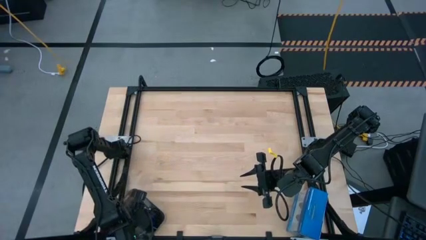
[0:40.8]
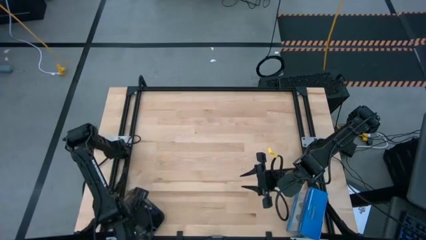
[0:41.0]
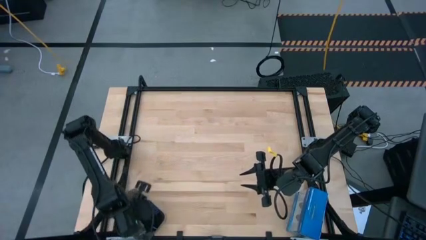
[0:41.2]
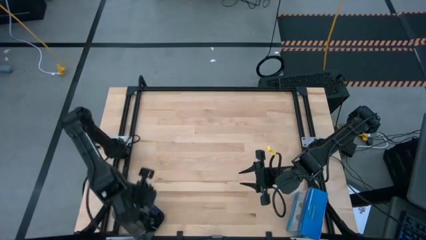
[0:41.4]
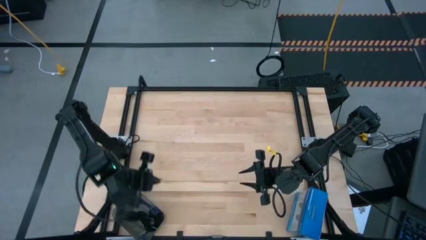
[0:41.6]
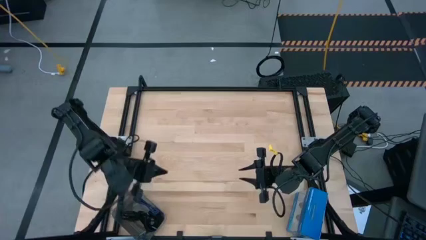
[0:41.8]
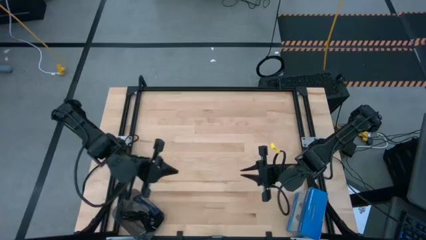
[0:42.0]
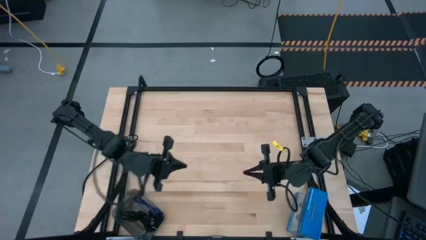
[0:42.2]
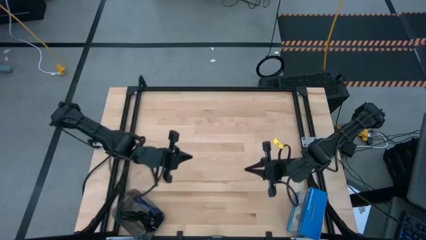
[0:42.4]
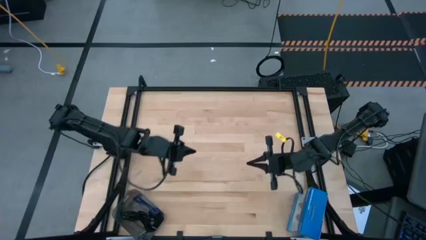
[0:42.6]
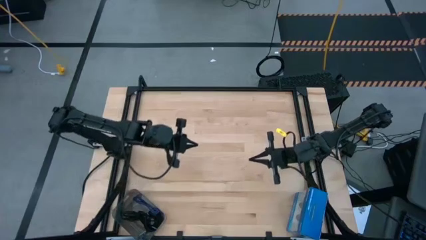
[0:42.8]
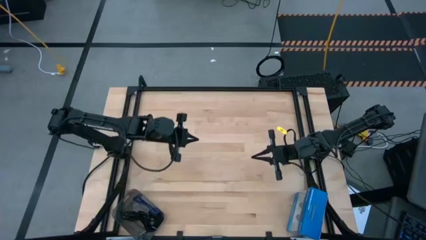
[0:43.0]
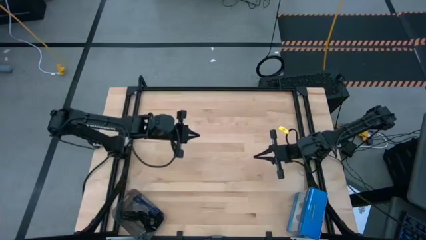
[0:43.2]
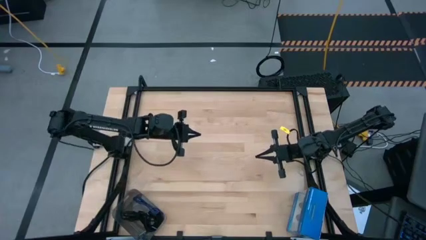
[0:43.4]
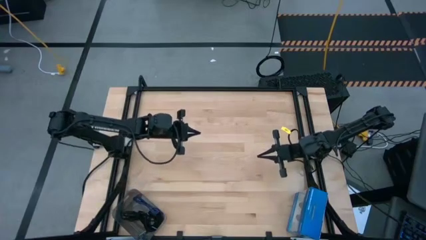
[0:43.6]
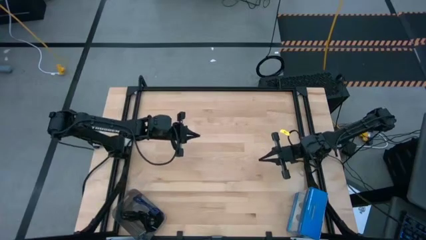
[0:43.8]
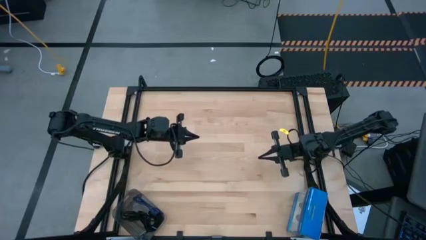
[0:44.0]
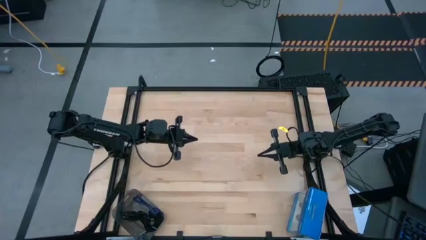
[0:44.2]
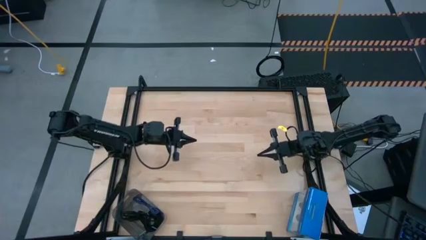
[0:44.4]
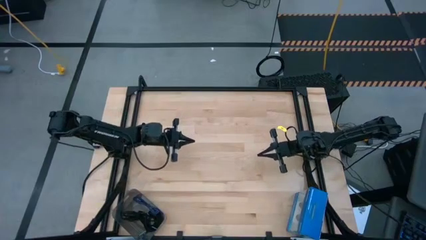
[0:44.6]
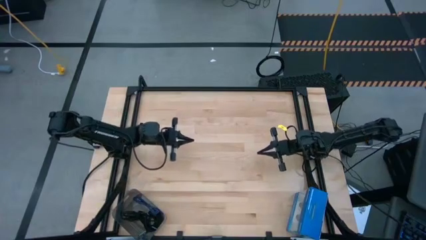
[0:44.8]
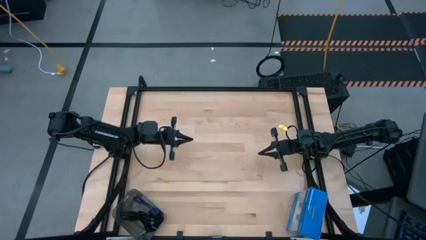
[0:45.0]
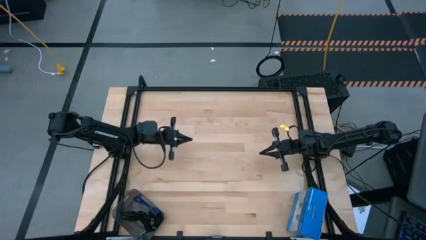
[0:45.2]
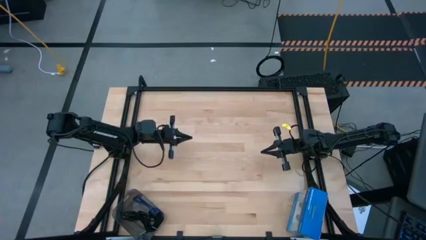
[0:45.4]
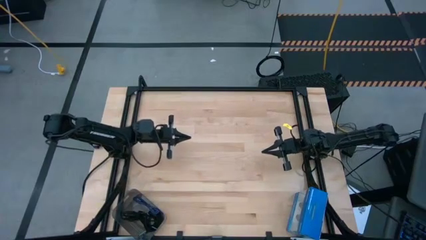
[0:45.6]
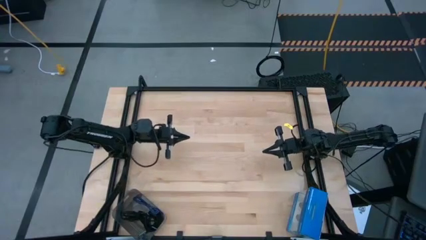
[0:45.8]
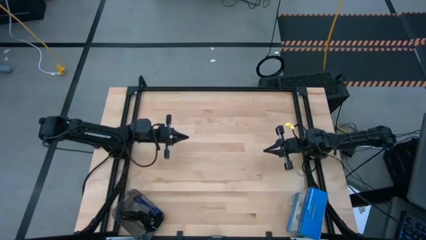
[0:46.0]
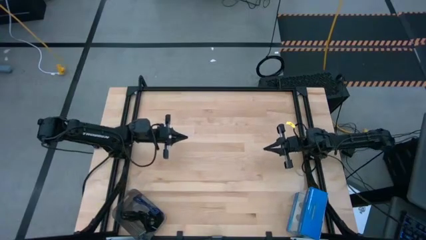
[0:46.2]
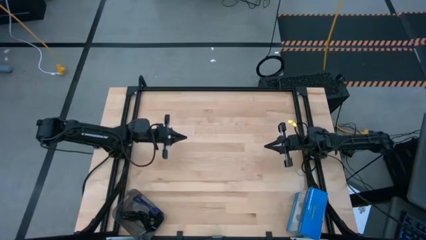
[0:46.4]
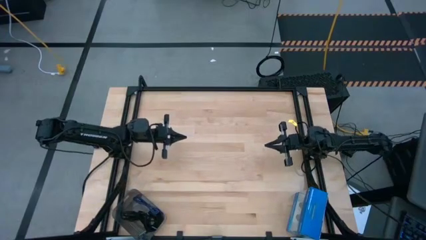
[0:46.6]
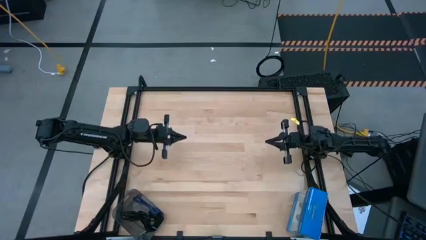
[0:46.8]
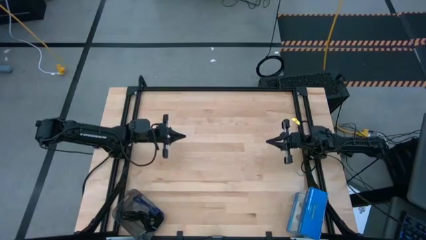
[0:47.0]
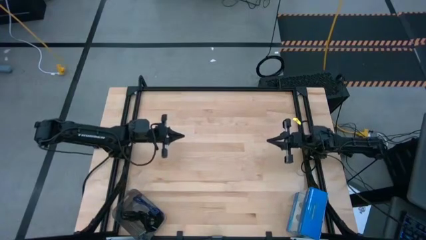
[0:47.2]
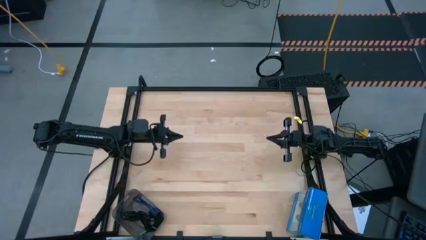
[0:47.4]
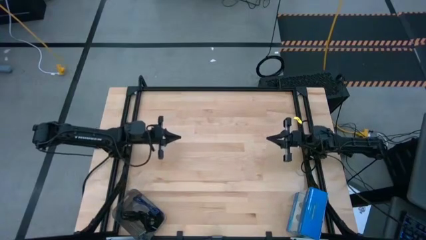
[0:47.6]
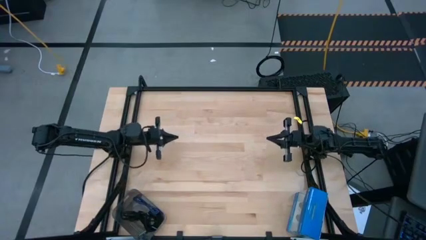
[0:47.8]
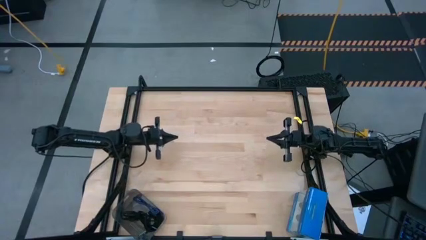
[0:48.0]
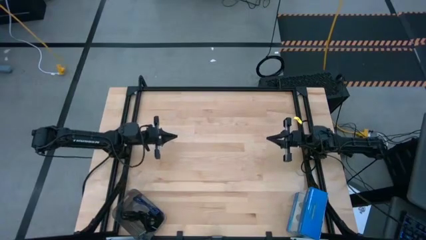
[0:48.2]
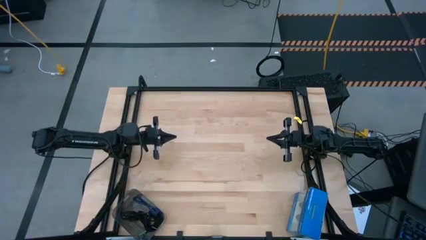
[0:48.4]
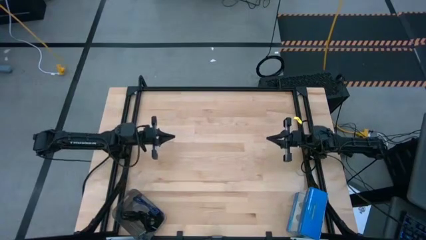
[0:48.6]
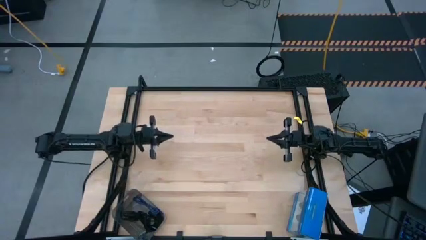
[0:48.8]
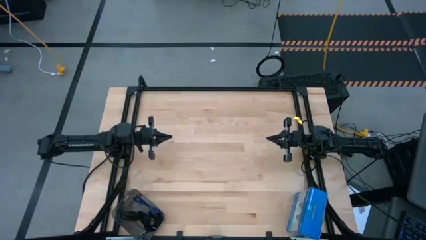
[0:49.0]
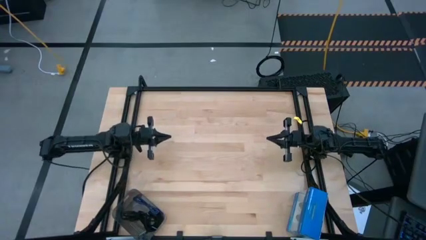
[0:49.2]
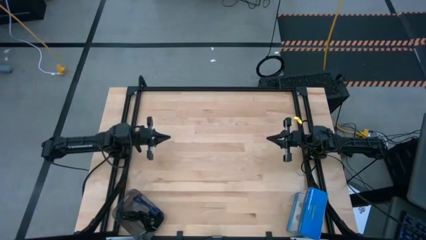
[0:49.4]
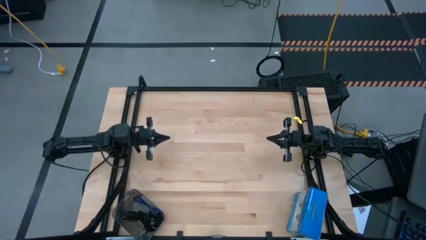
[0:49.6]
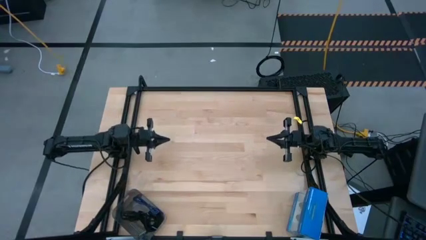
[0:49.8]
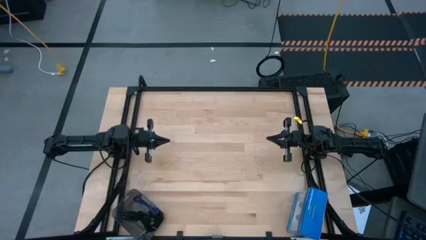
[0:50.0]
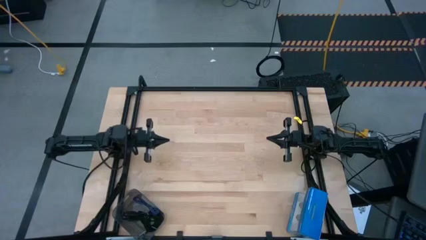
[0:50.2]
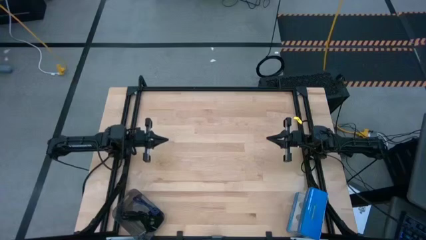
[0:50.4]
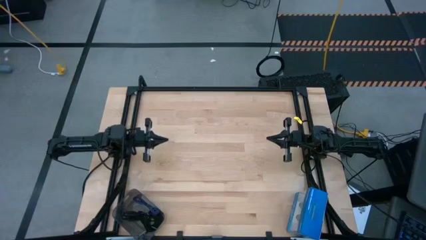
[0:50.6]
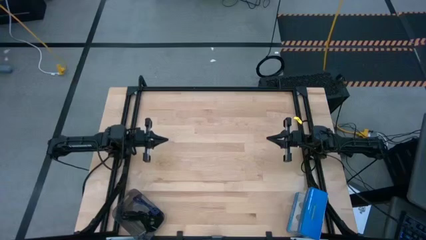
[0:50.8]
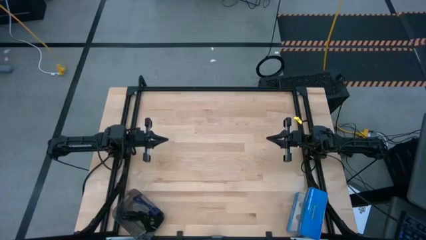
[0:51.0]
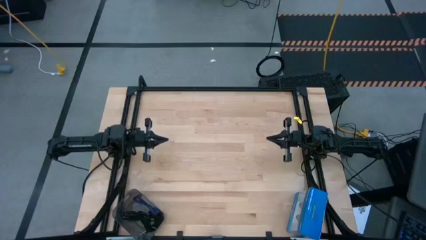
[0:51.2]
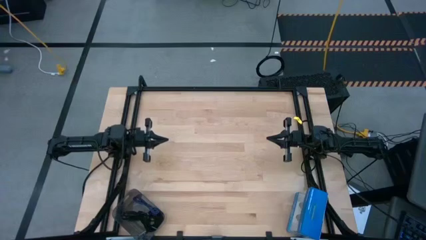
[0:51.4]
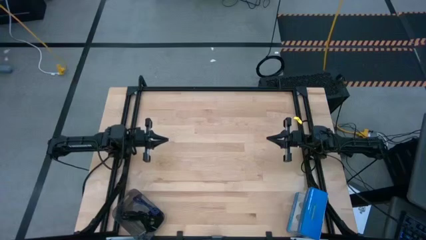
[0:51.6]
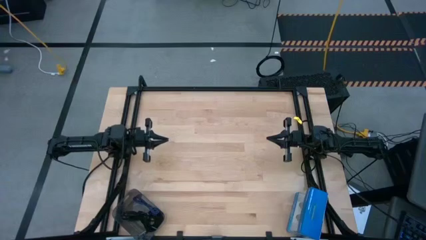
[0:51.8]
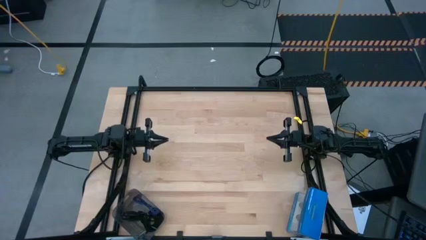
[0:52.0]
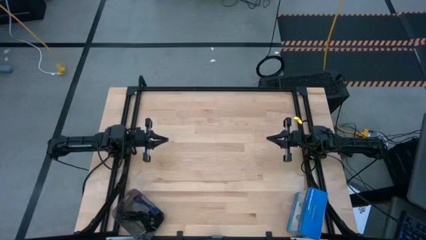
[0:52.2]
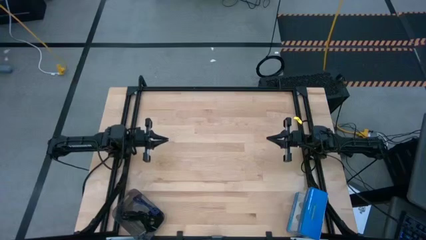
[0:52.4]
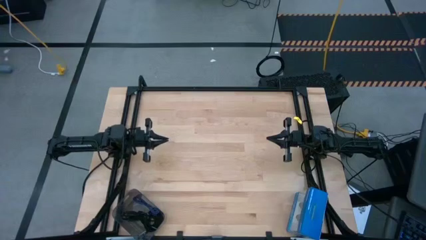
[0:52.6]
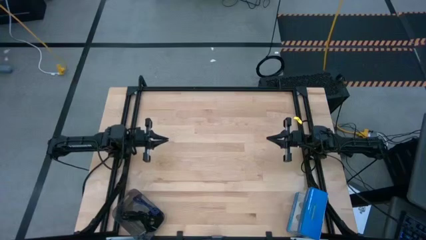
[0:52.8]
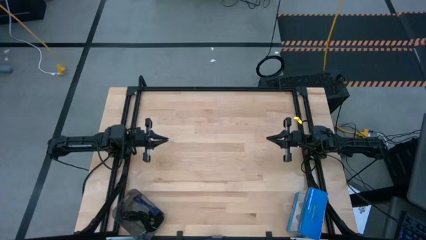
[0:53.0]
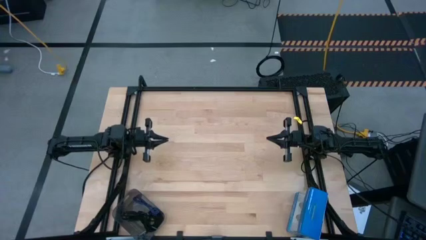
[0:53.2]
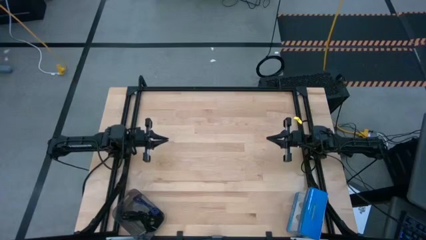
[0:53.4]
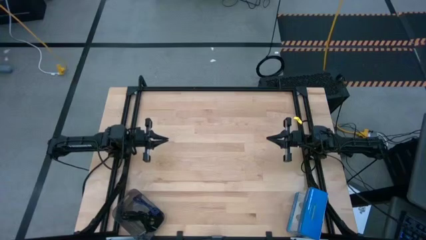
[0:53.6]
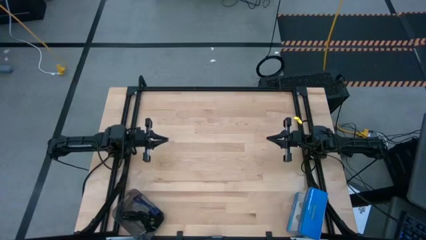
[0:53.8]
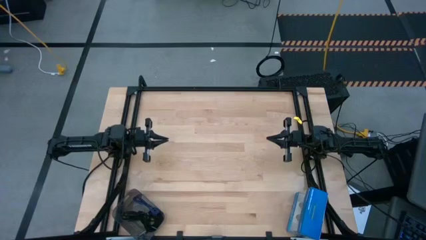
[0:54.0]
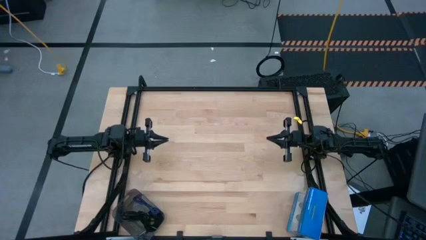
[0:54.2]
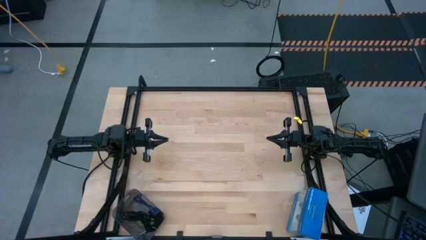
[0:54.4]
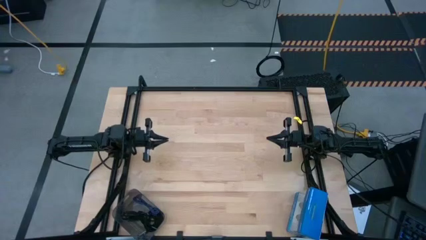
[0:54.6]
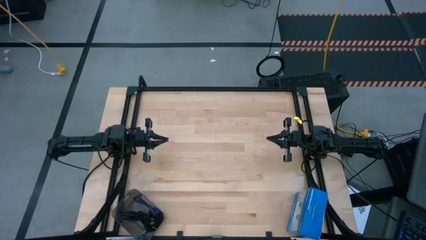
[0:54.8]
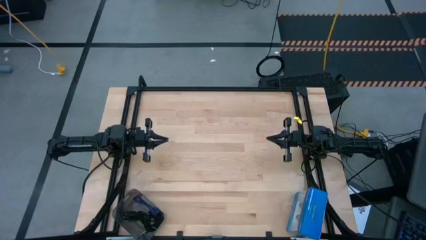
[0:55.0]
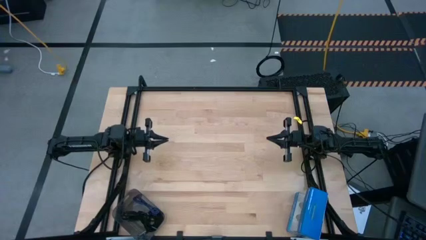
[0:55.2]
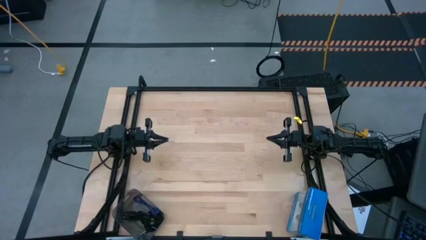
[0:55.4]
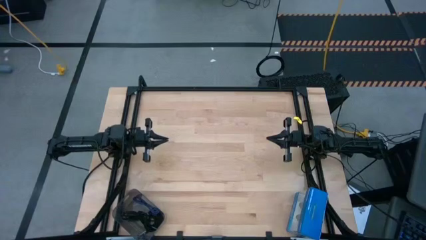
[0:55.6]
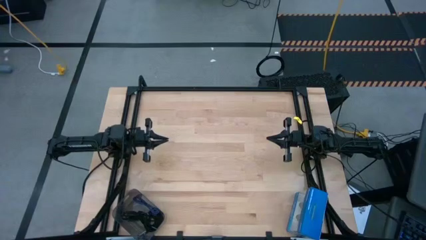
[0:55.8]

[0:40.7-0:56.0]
Task: Pick and place USB-C Cables
Return to Home Position
